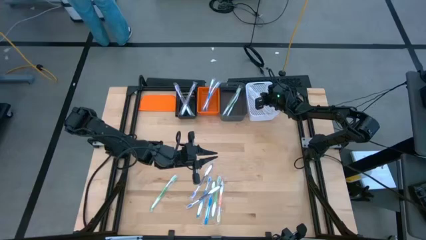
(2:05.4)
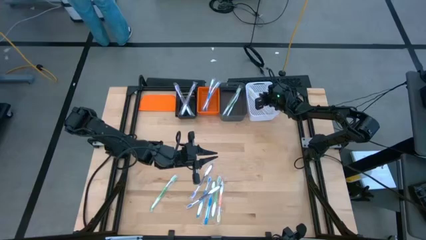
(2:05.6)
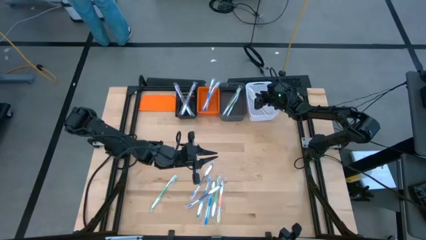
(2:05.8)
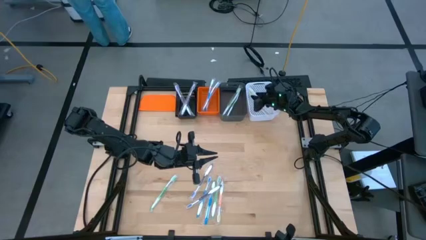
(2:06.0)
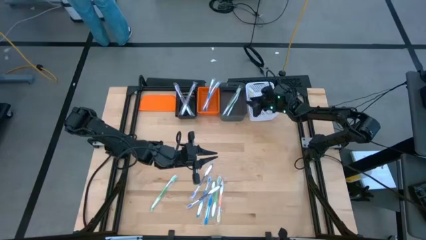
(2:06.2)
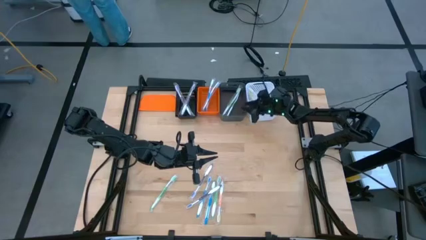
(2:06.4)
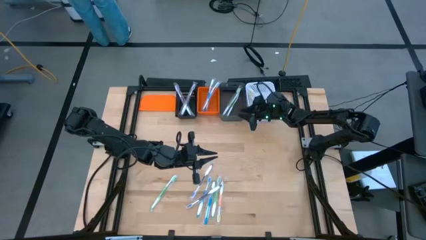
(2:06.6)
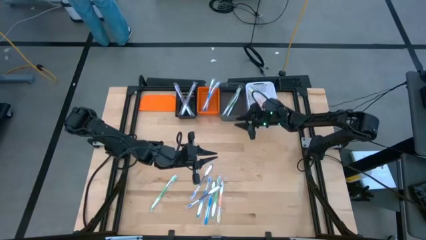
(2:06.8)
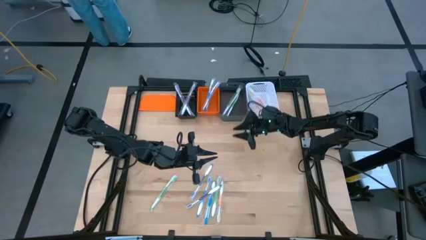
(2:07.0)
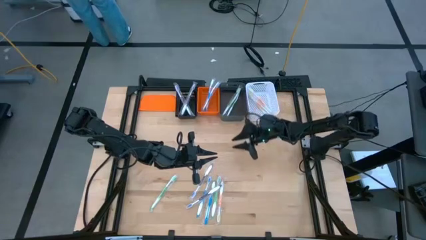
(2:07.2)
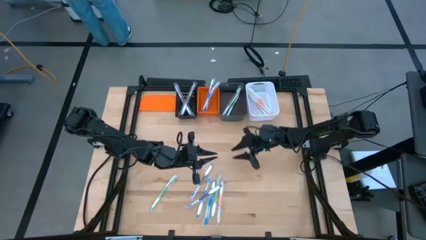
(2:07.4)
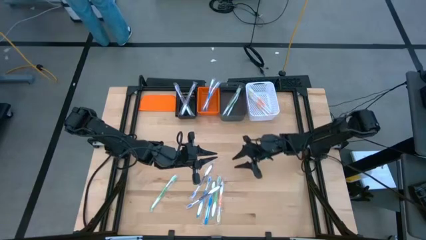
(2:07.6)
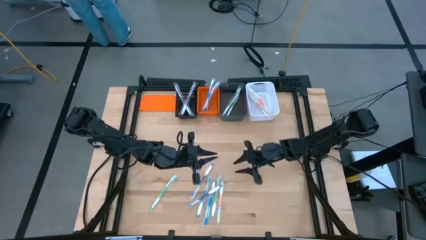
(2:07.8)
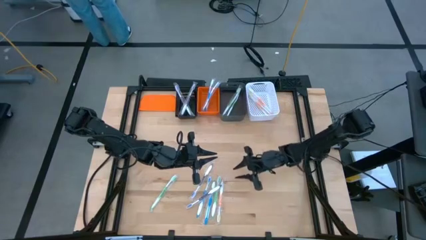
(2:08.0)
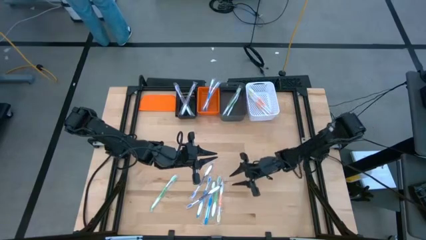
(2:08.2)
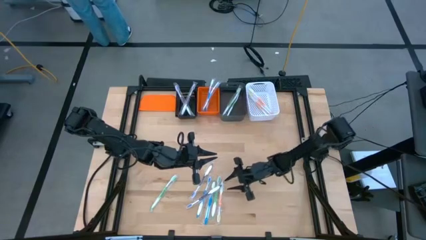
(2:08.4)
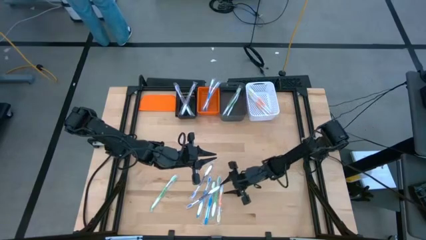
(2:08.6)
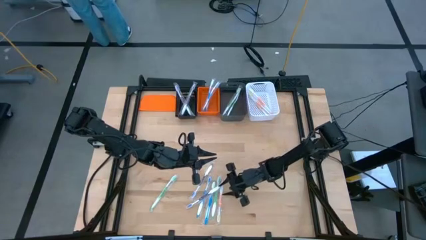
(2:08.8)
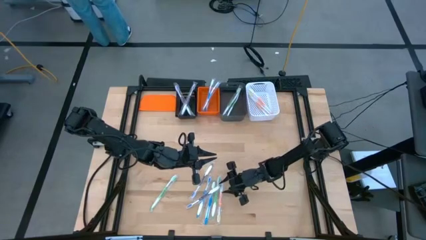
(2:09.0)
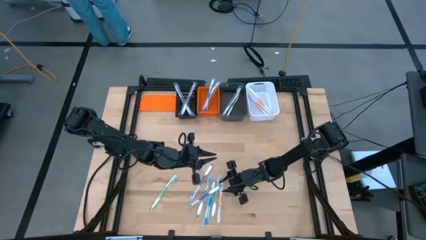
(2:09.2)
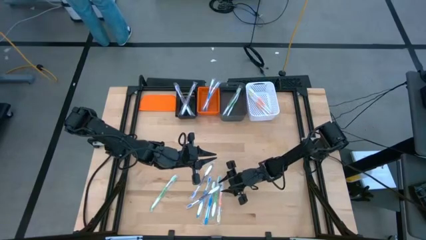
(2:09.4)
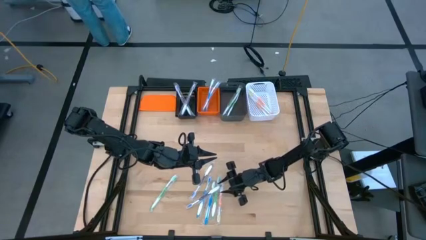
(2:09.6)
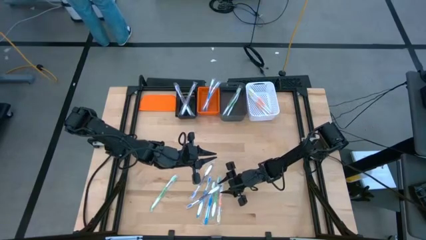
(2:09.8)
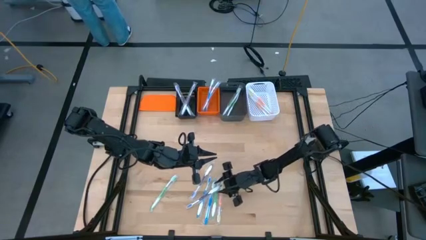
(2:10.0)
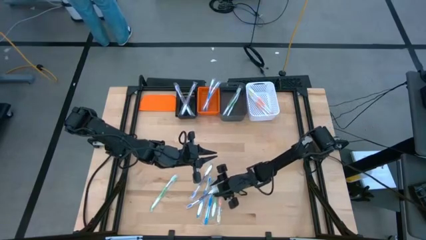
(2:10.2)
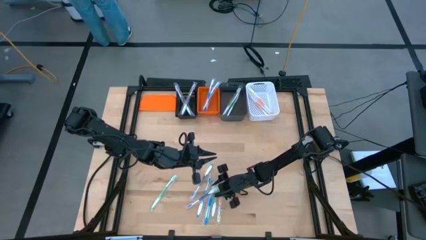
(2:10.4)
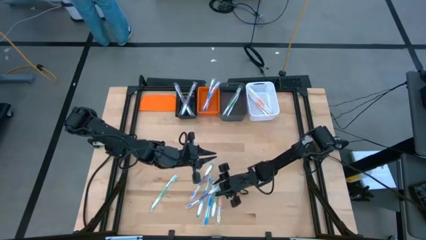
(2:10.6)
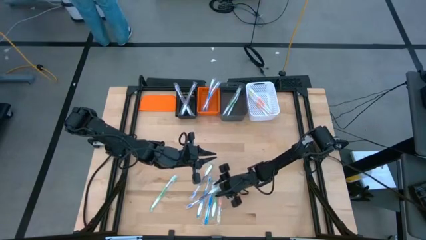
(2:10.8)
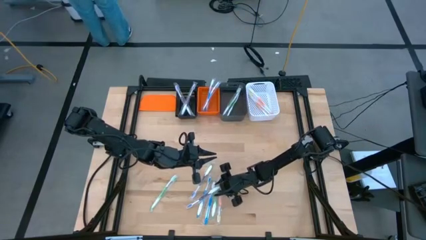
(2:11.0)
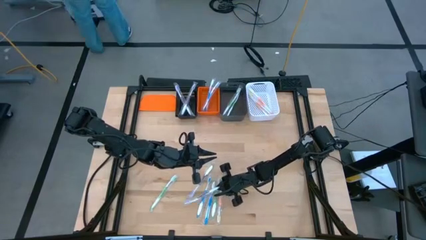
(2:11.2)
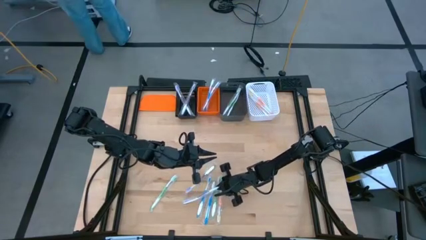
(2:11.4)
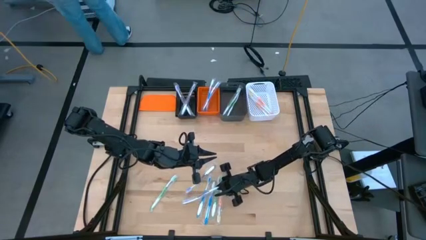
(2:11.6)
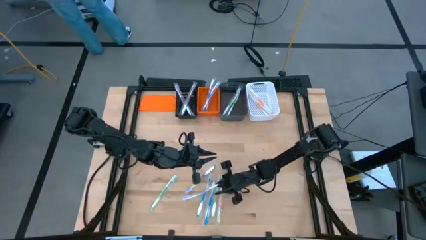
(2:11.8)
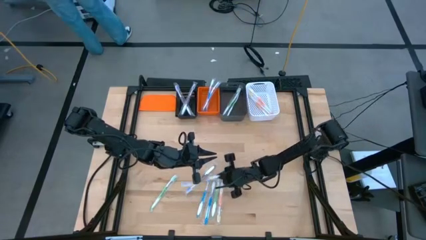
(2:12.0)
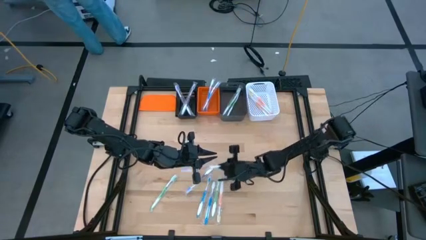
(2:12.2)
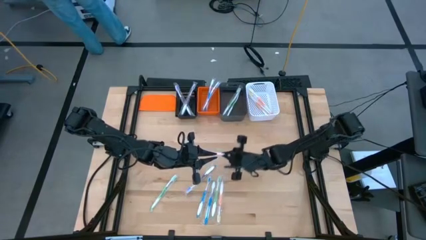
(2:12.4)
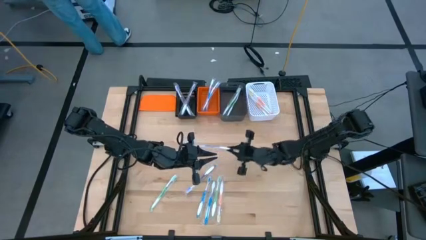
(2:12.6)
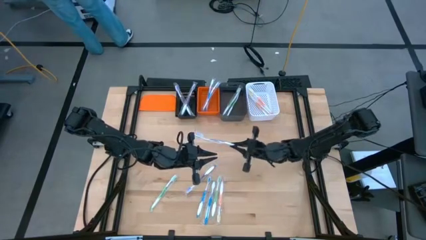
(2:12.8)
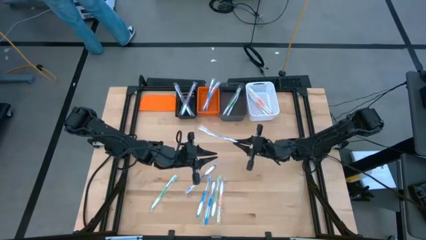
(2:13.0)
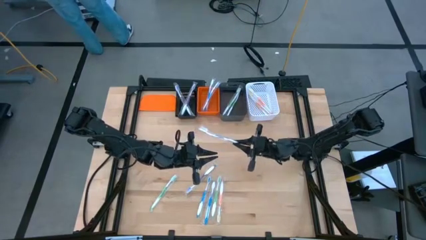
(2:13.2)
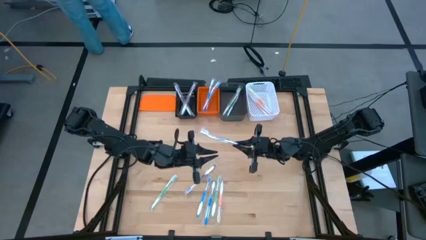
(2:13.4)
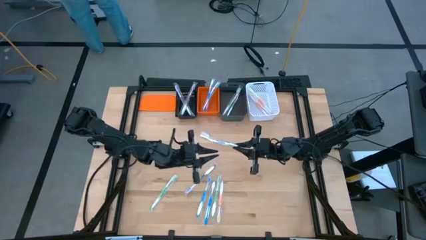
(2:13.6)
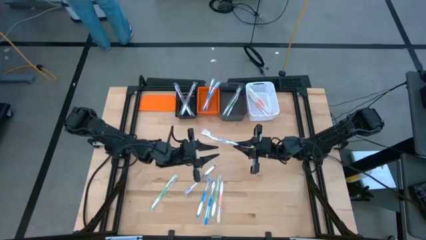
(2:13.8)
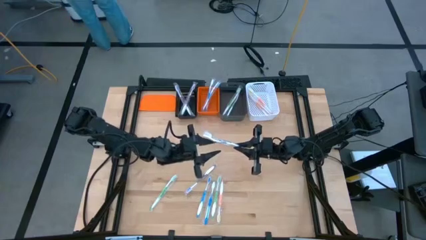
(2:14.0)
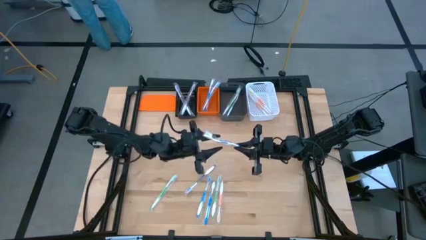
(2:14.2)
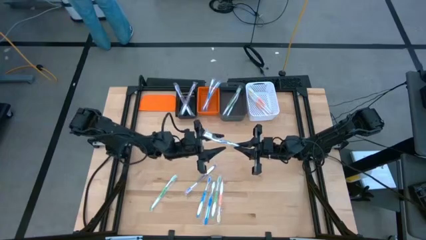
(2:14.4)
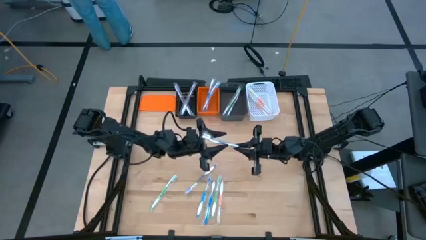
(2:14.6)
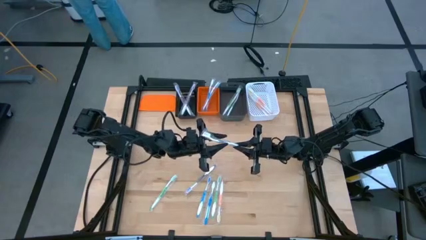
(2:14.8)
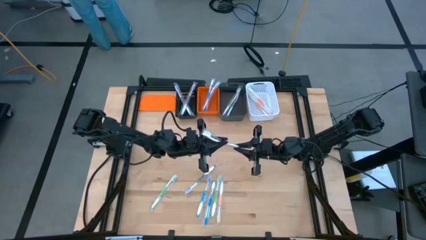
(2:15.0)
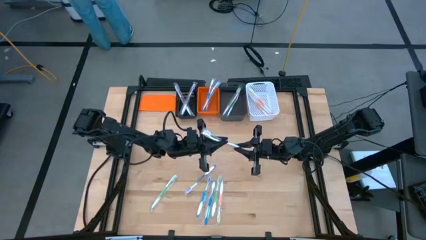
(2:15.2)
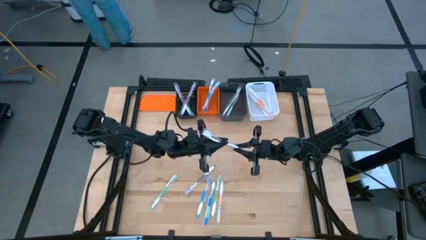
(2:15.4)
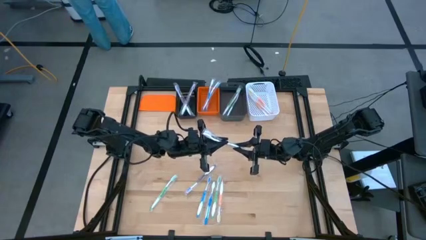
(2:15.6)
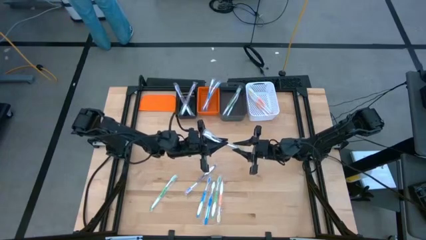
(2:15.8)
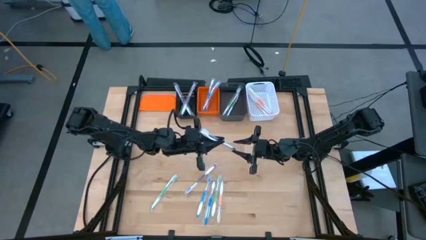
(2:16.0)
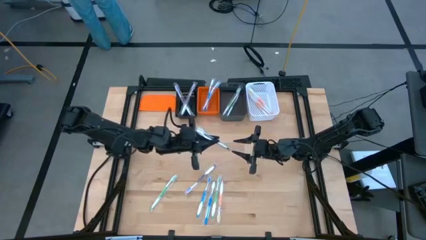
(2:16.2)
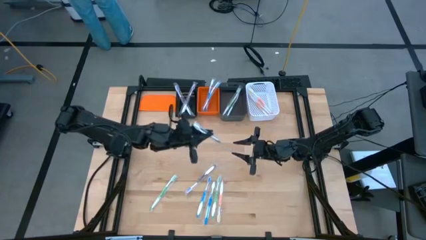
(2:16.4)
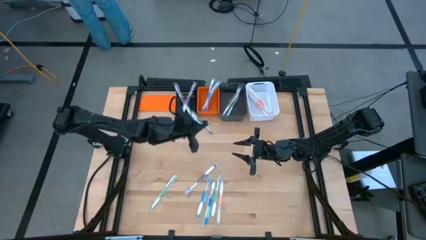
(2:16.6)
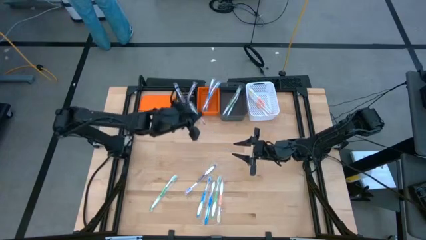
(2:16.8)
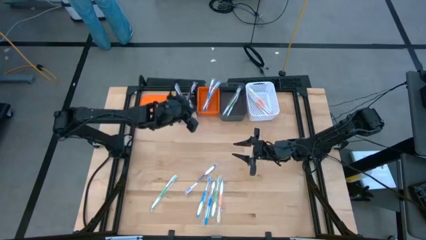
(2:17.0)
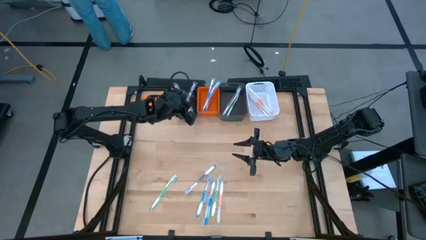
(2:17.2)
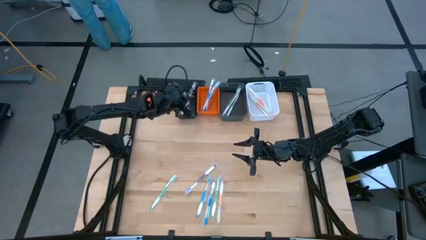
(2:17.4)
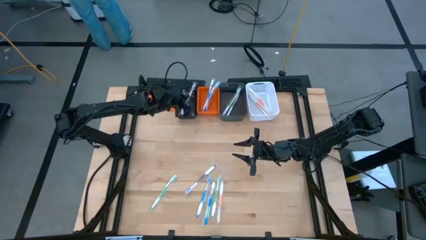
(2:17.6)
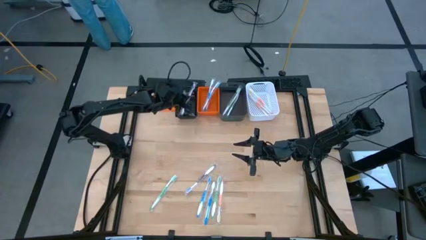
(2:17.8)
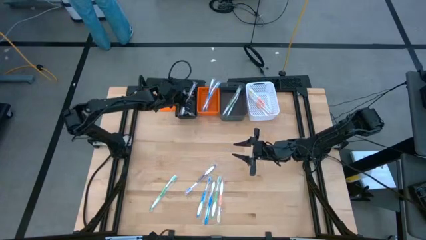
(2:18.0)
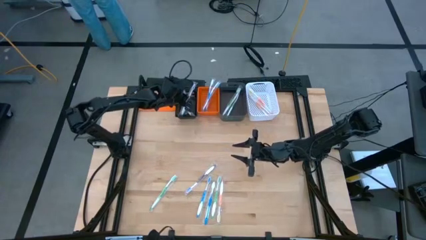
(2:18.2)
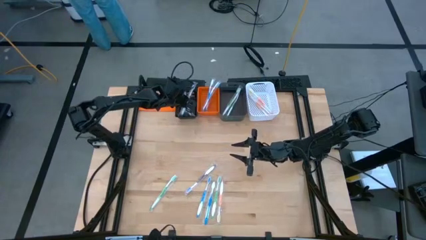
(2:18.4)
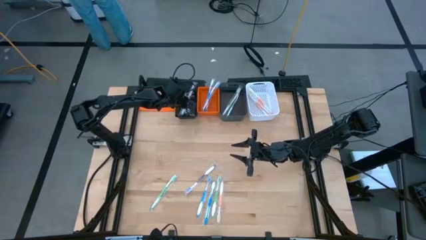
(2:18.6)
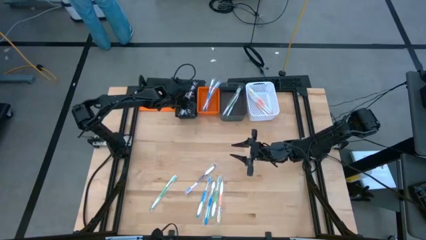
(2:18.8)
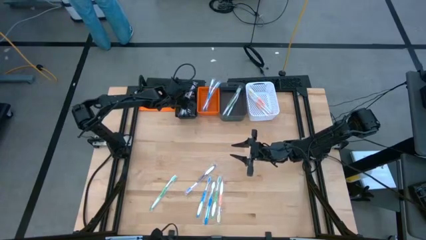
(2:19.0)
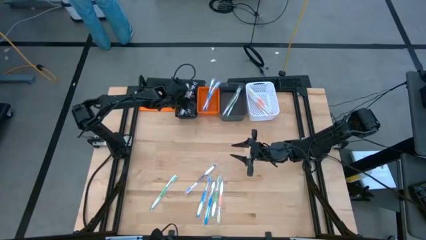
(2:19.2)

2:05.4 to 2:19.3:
Task: Pick & Place Toothbrushes
Put the violet toothbrush into the black basket

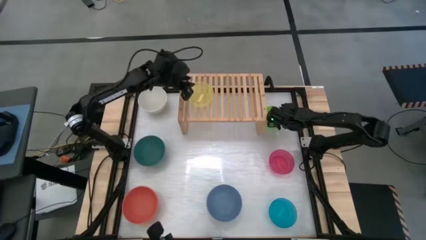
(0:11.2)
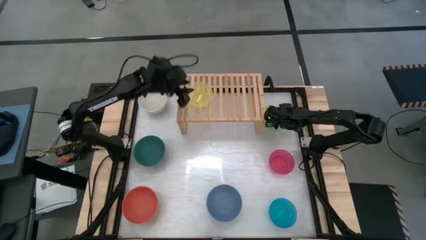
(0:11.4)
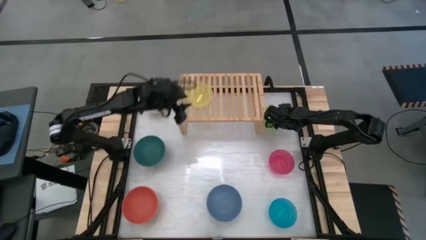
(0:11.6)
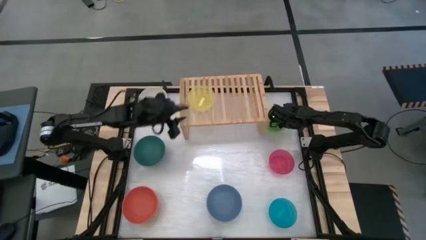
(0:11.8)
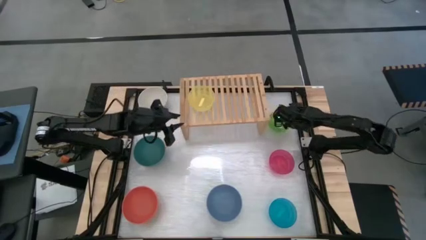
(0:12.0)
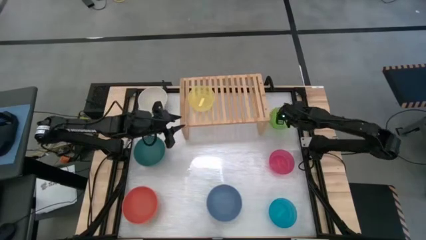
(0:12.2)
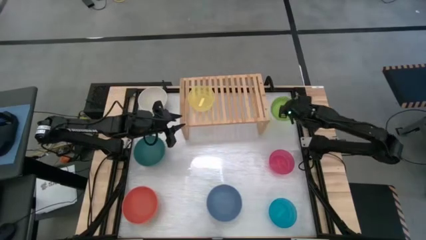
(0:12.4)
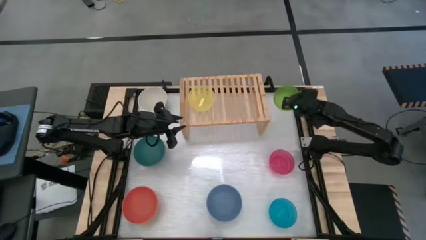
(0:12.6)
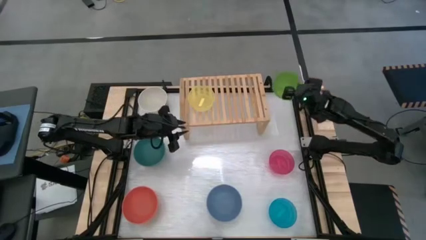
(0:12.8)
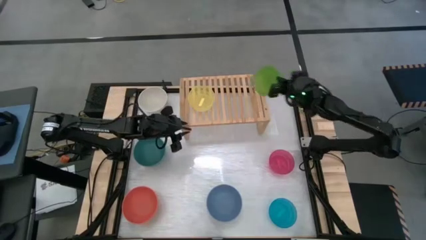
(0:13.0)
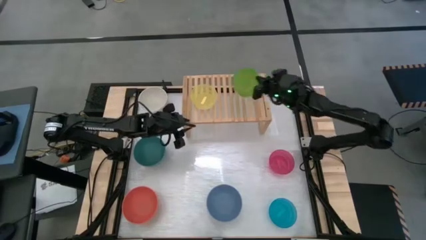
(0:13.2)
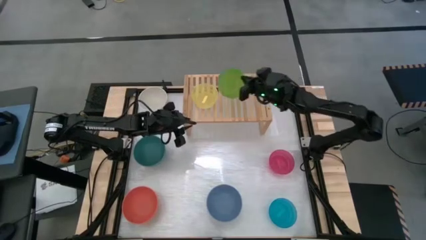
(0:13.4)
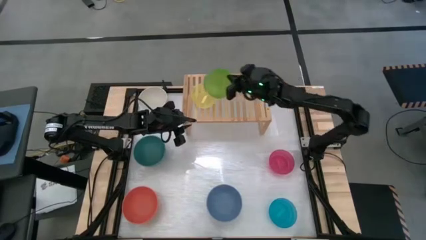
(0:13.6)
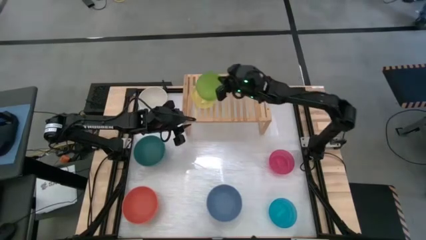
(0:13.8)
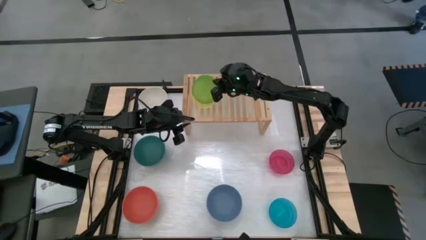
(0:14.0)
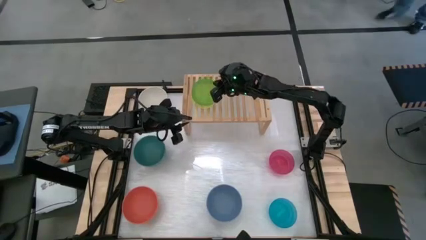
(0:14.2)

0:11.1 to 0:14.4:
Task: Place and stack bowls onto a shelf
Stack the small light green bowl on top of the small yellow bowl on the shelf
